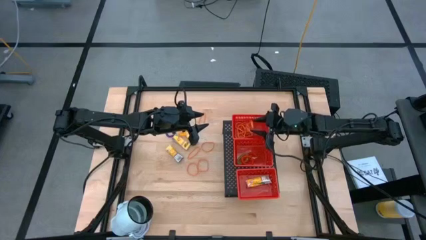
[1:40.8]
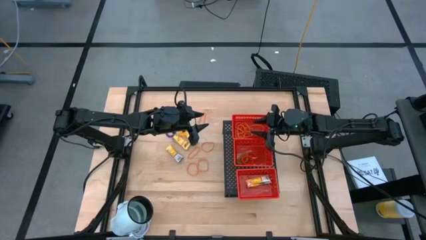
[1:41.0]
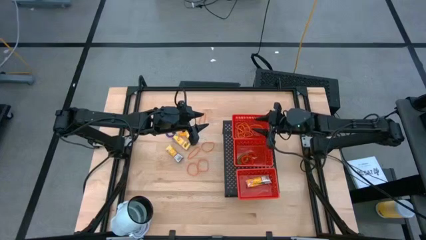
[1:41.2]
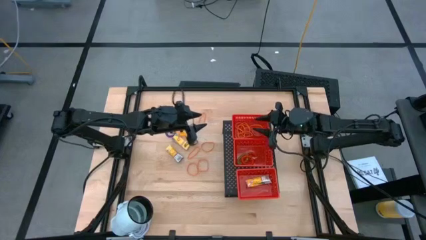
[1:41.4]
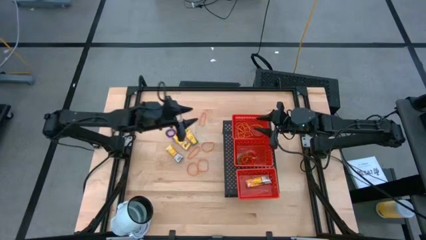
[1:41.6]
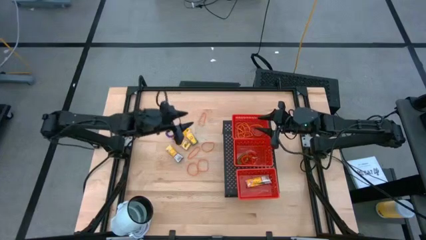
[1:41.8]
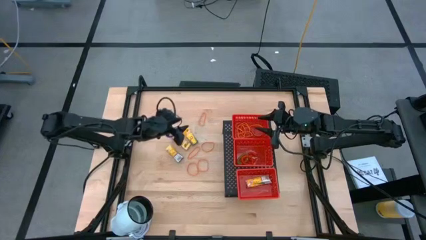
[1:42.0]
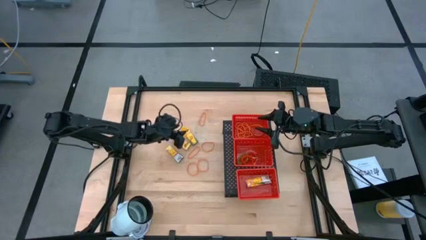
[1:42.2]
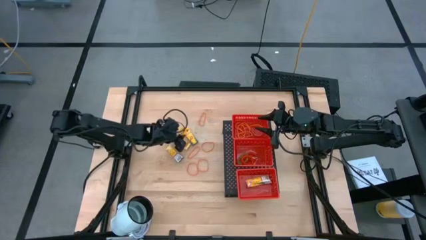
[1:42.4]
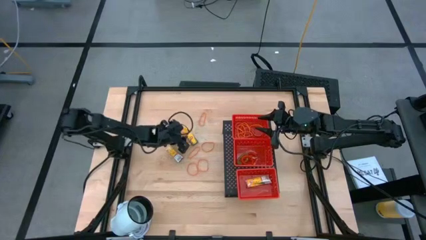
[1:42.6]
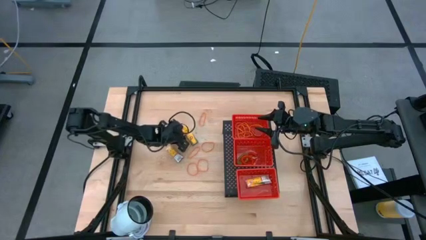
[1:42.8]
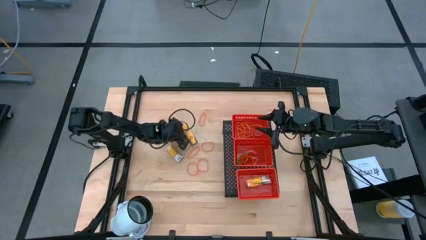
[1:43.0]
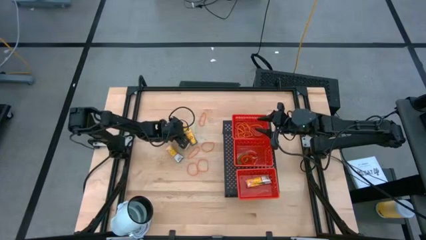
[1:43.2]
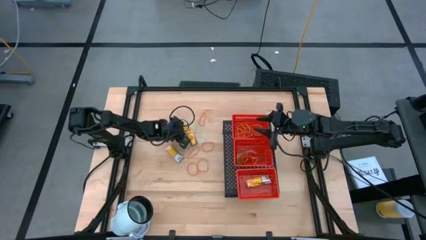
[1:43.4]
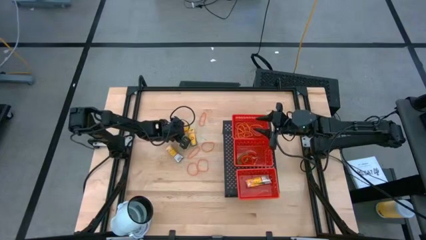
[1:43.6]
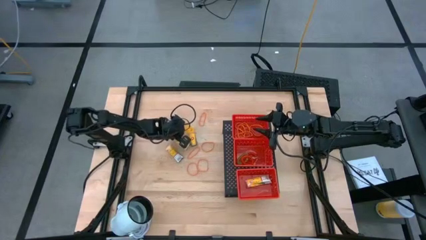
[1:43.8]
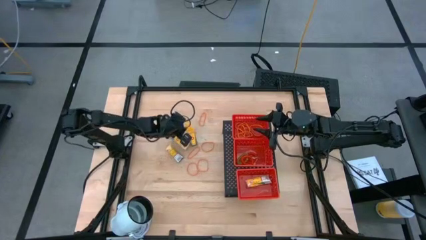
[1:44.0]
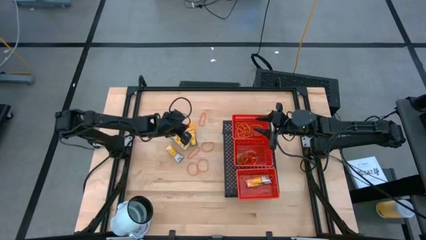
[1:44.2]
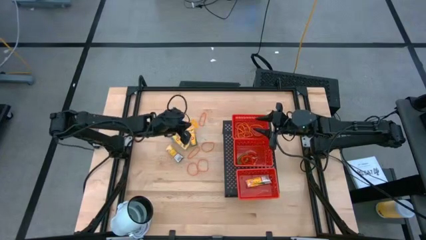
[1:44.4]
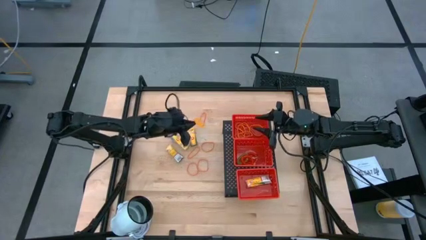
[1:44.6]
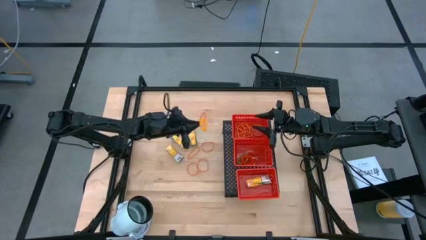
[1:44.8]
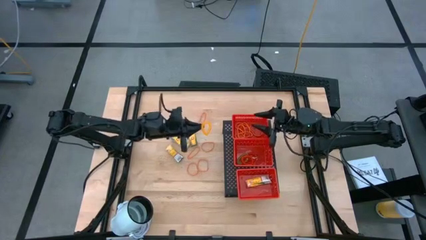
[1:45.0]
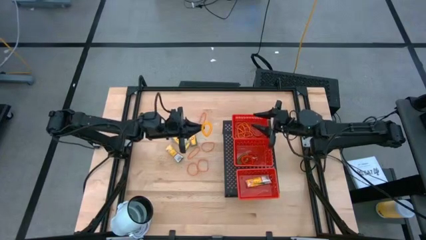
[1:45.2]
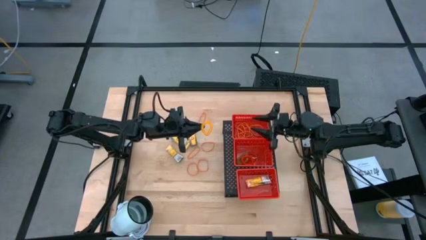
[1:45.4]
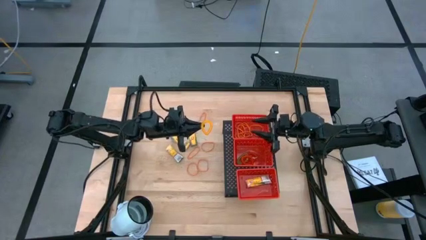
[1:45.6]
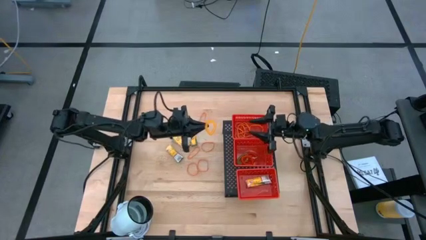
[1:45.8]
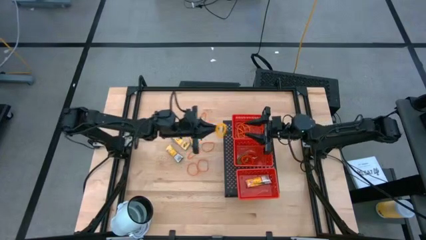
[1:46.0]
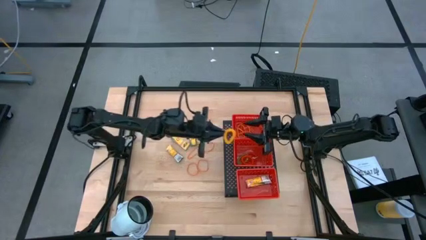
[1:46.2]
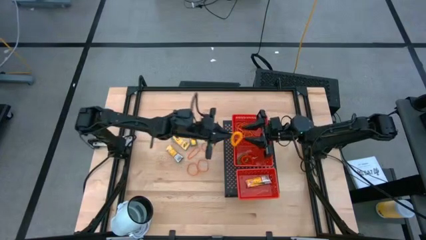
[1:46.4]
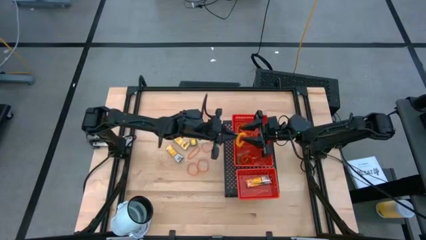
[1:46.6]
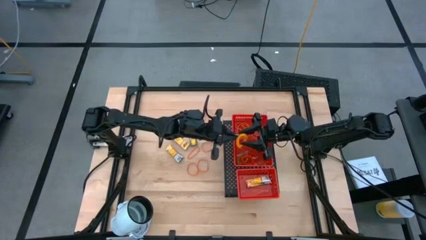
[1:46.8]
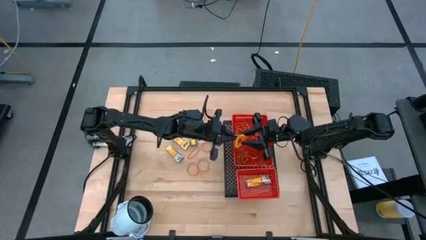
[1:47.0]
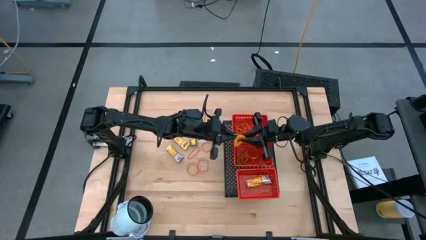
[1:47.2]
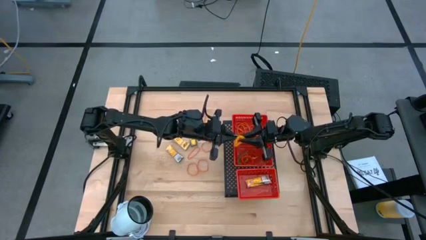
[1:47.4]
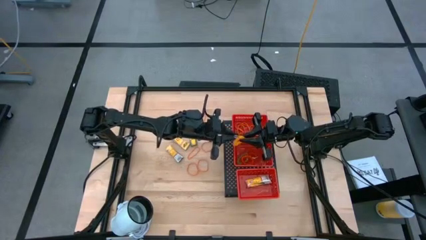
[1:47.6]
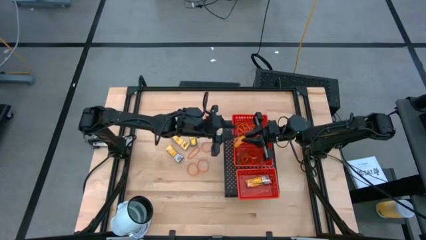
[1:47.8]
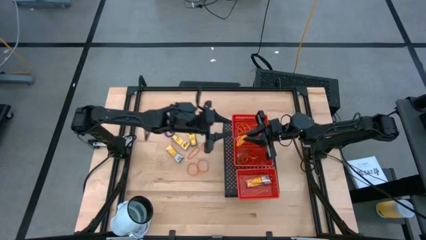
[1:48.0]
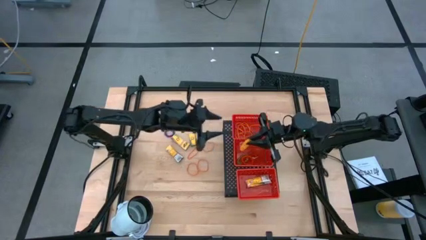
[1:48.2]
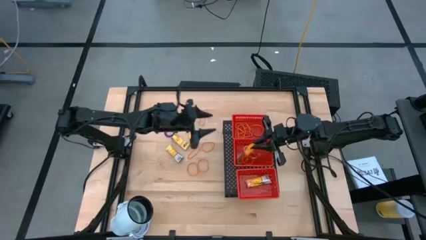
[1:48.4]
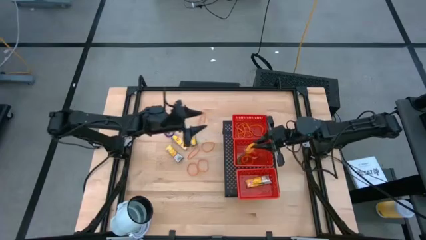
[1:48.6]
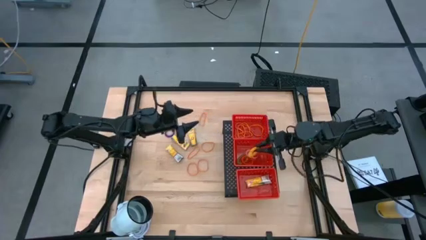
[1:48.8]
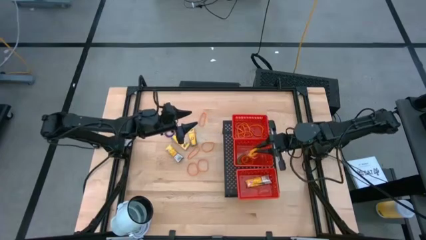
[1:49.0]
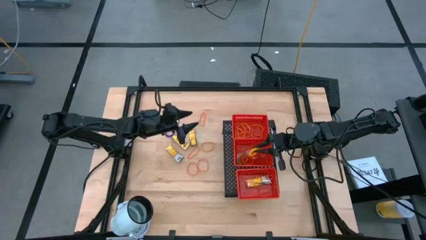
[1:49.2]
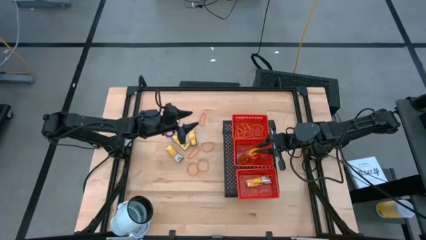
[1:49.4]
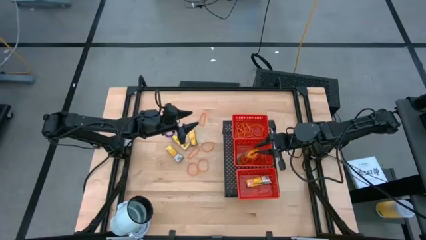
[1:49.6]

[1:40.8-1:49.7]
Task: Pick & Place Office Desk Supplies
Put the yellow spring keychain into the middle red bin on the shelf

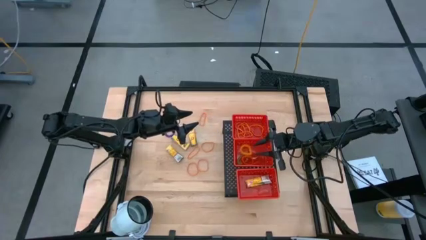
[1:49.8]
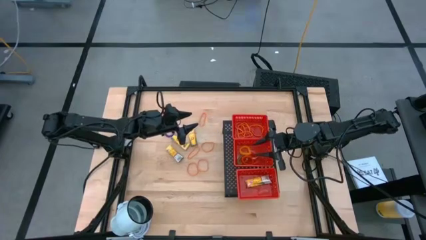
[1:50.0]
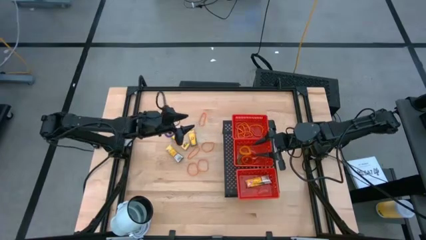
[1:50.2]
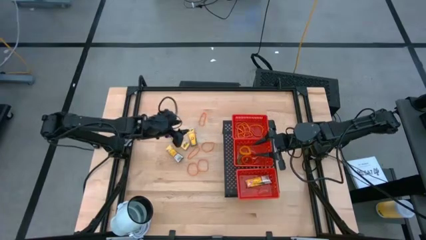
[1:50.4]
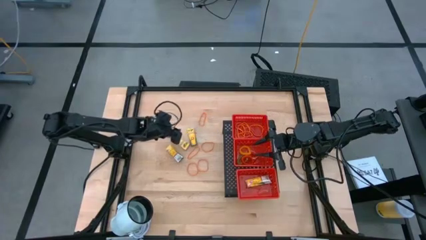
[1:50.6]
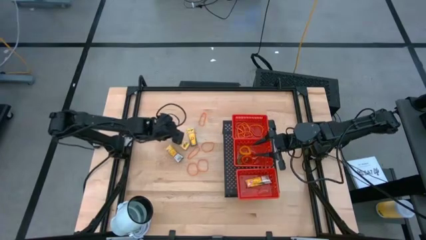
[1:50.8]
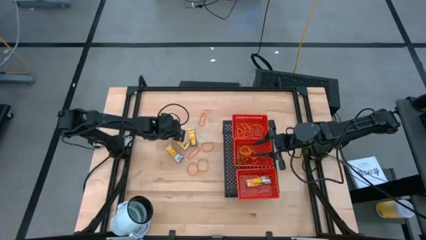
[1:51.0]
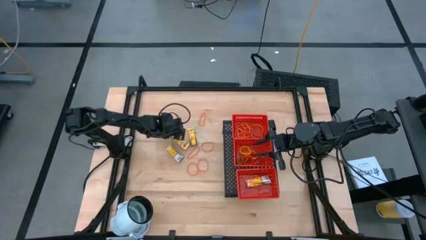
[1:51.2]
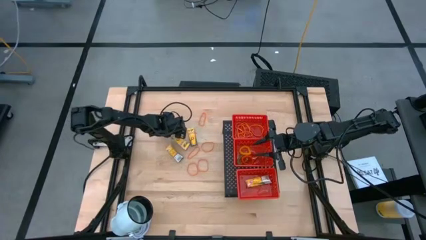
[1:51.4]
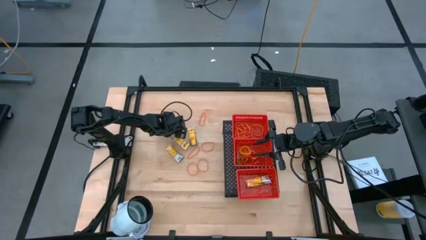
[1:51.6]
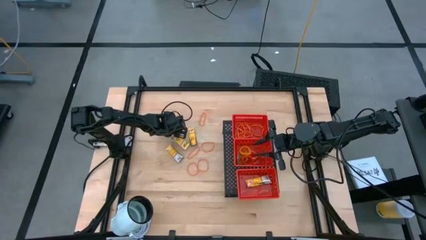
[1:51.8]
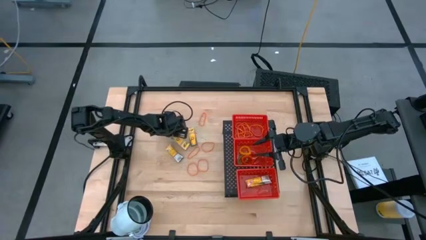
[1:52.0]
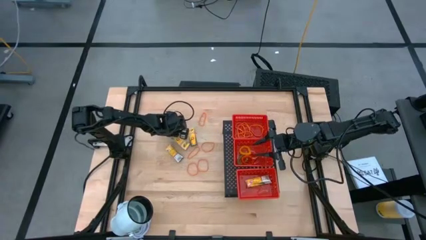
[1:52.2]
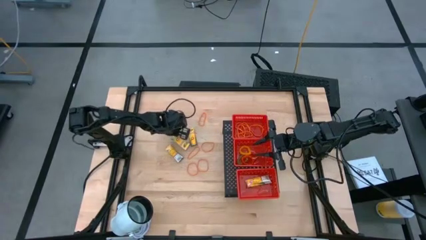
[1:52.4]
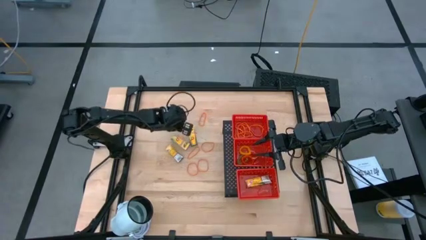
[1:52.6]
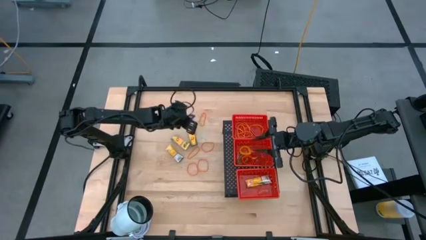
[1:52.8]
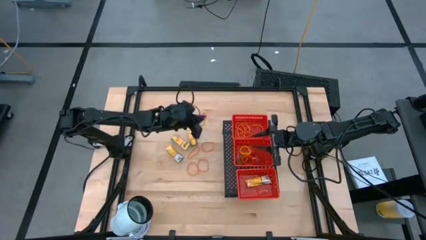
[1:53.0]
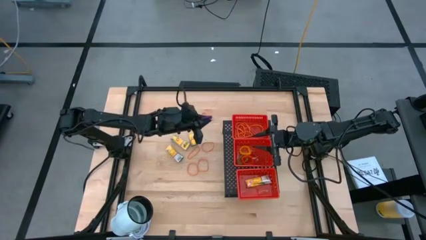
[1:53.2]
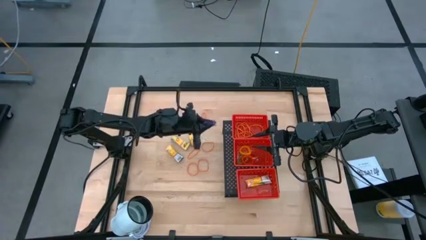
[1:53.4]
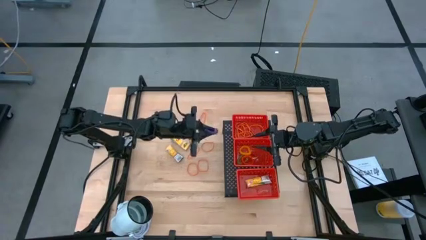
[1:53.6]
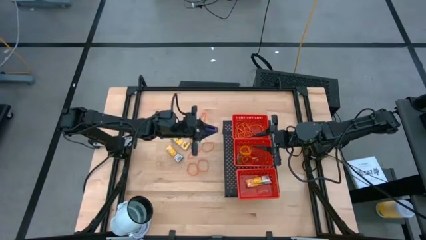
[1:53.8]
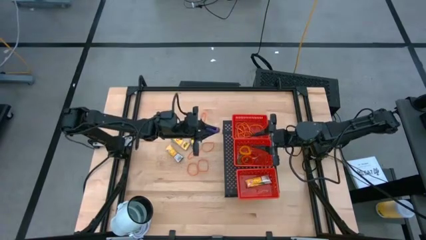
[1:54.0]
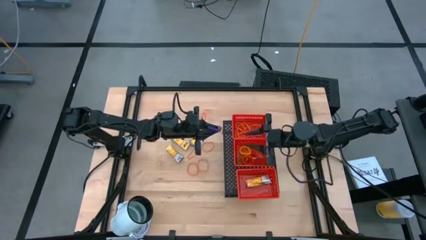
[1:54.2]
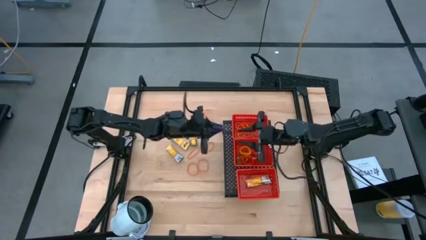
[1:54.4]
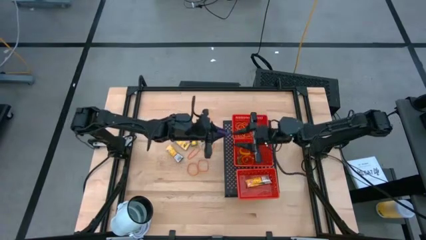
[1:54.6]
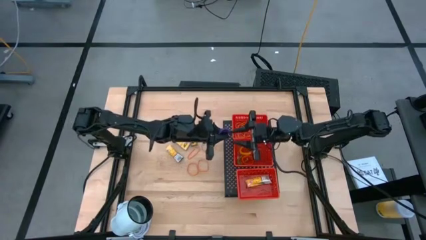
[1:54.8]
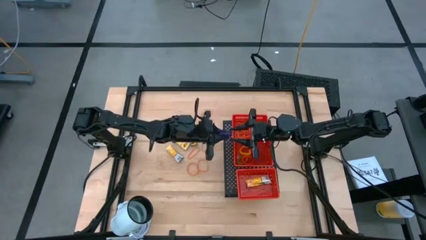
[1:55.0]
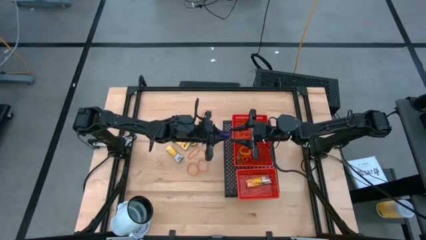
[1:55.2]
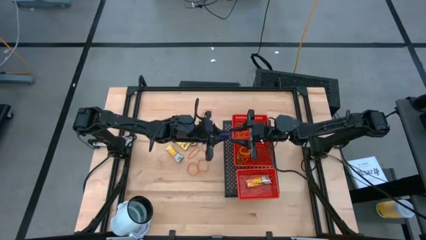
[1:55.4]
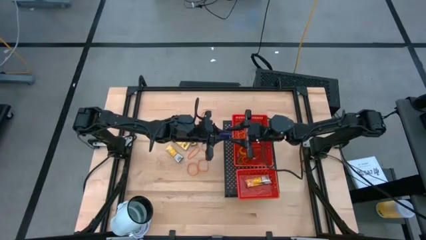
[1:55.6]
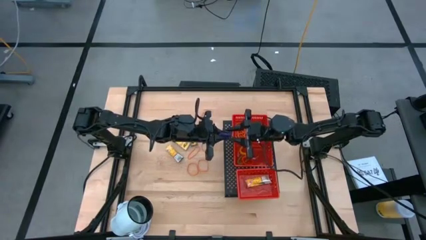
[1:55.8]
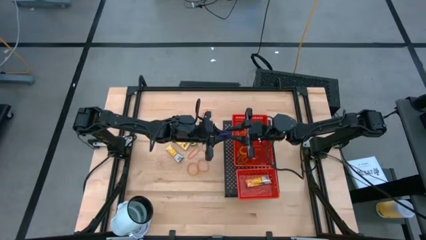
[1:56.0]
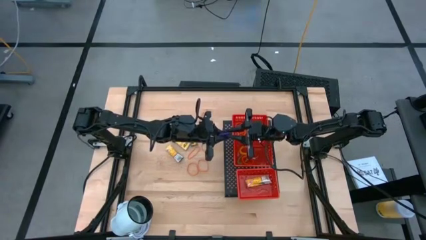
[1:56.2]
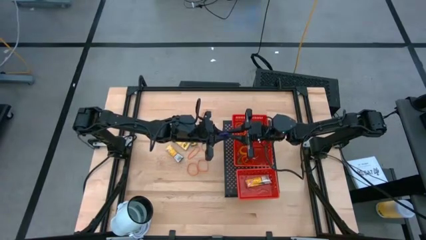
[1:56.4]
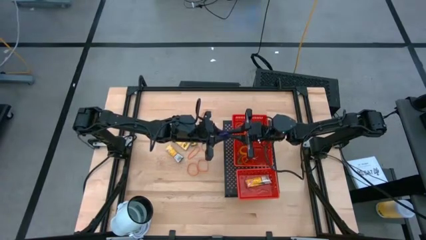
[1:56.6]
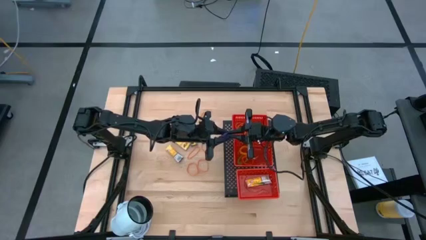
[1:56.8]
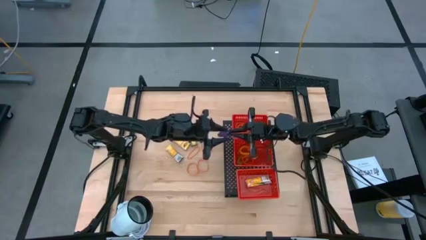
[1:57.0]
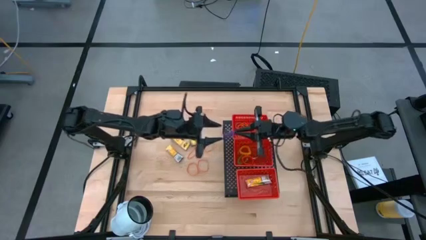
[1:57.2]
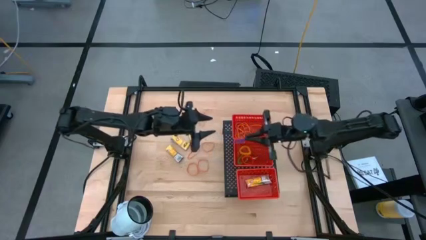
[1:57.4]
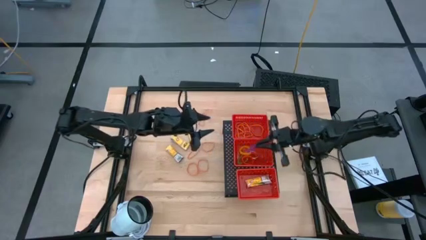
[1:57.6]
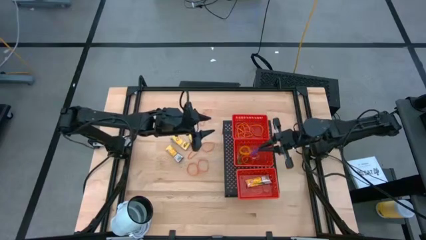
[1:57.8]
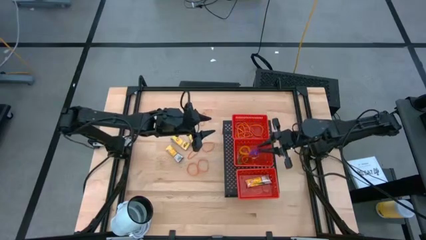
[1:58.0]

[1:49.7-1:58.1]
Put the purple spring keychain into the middle red bin on the shelf
